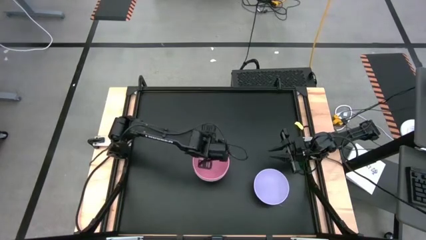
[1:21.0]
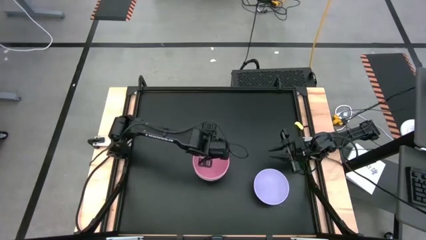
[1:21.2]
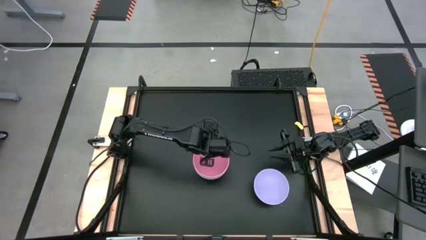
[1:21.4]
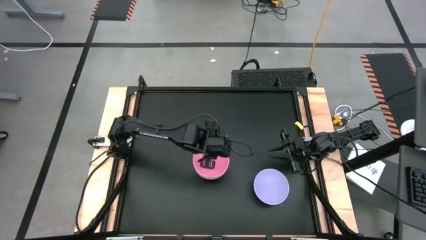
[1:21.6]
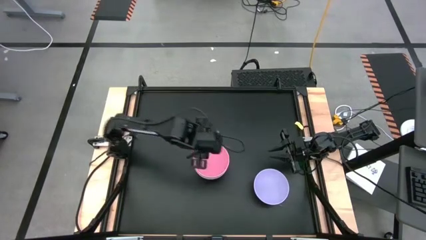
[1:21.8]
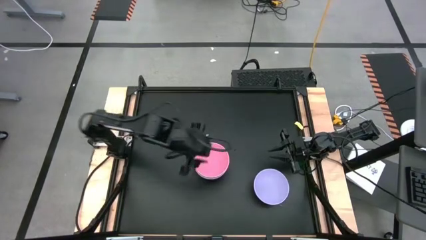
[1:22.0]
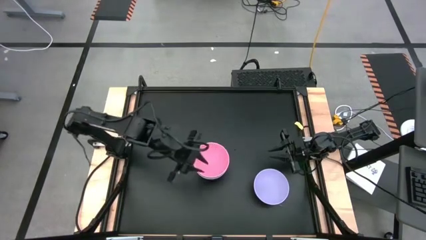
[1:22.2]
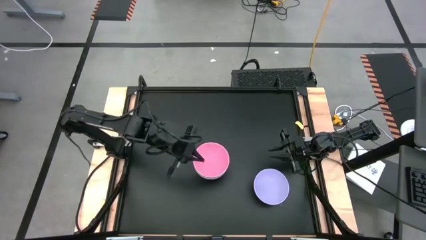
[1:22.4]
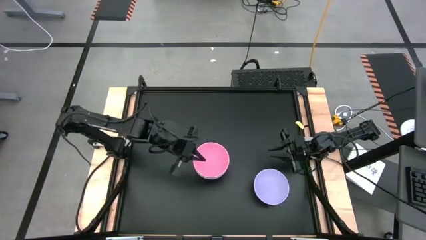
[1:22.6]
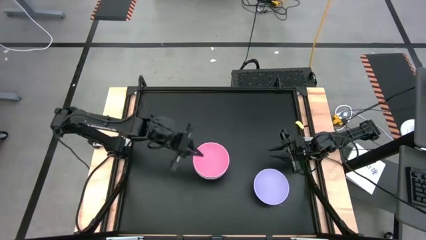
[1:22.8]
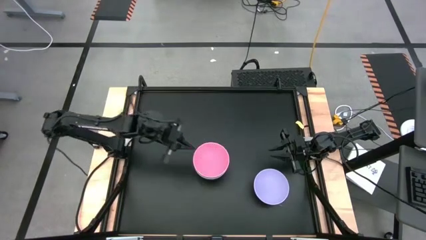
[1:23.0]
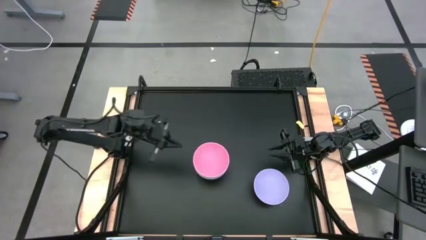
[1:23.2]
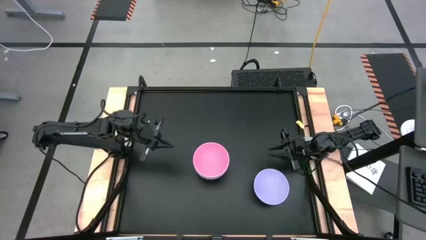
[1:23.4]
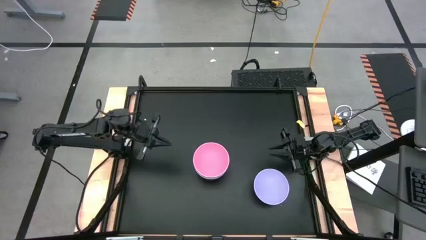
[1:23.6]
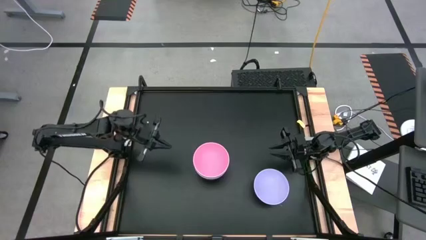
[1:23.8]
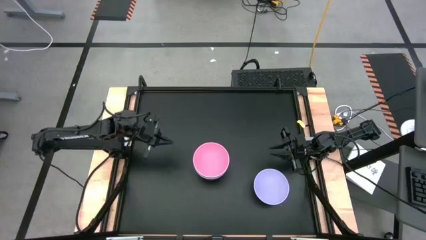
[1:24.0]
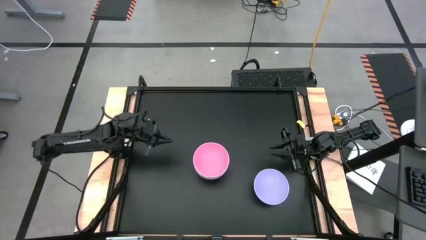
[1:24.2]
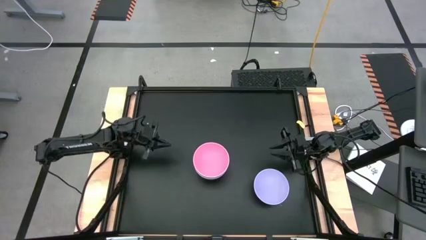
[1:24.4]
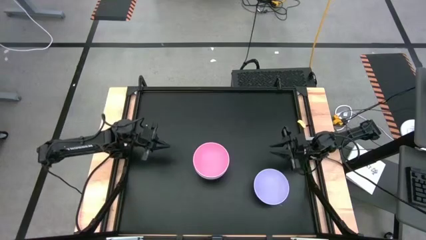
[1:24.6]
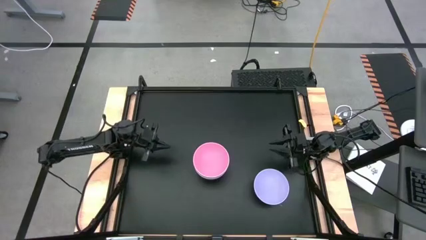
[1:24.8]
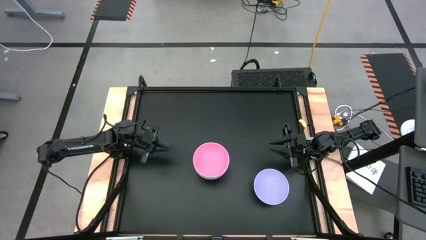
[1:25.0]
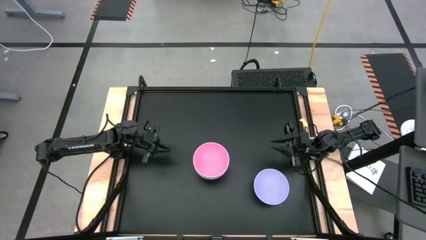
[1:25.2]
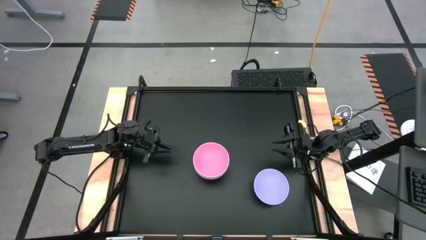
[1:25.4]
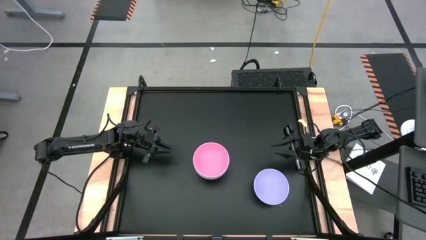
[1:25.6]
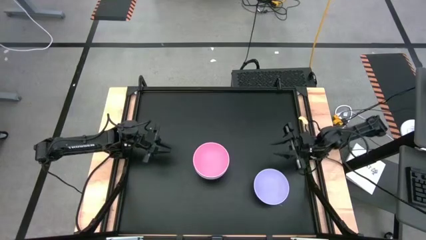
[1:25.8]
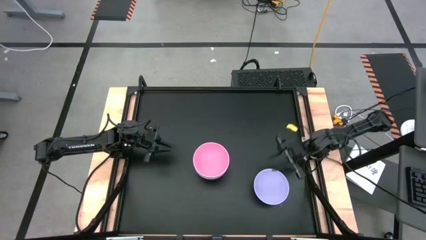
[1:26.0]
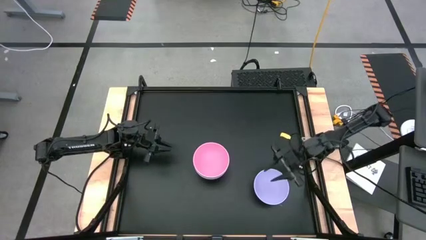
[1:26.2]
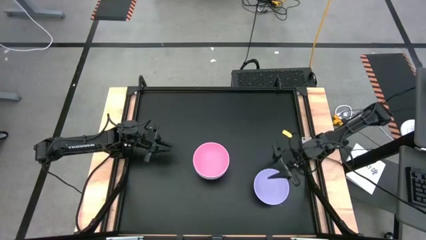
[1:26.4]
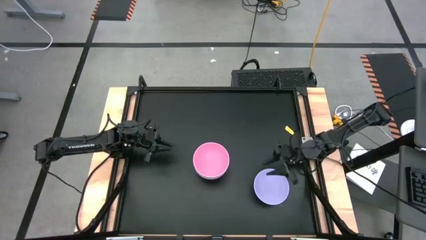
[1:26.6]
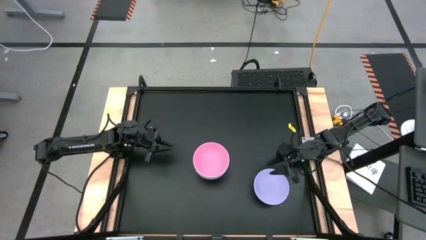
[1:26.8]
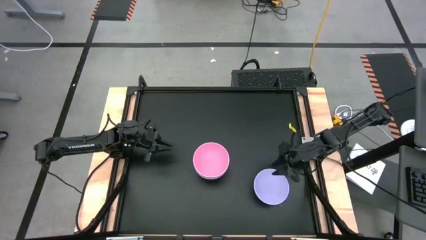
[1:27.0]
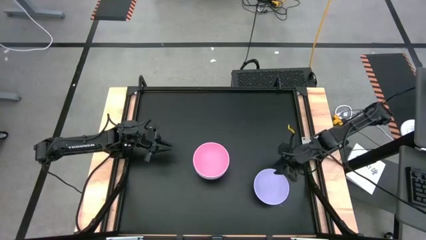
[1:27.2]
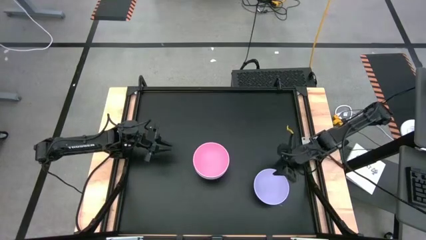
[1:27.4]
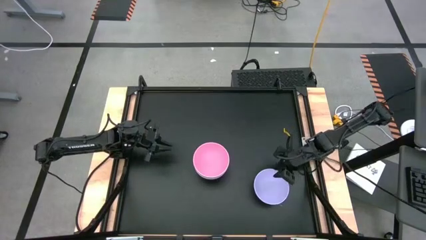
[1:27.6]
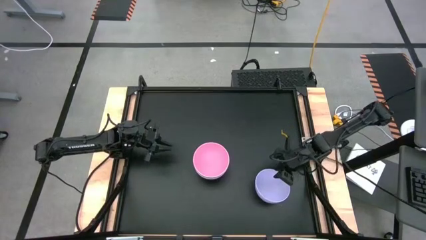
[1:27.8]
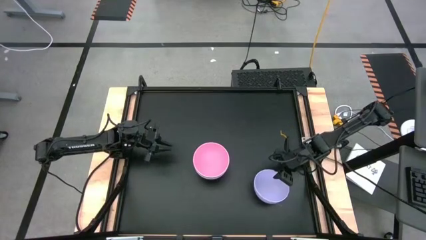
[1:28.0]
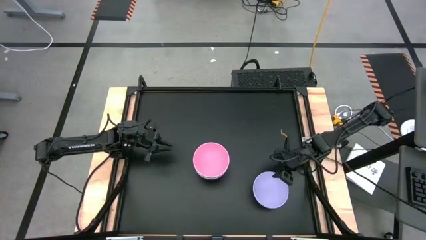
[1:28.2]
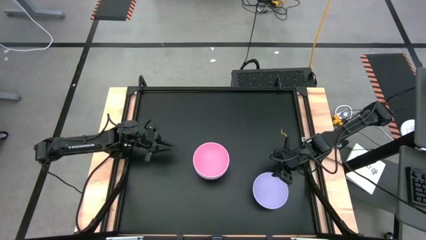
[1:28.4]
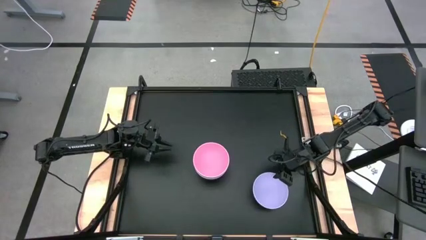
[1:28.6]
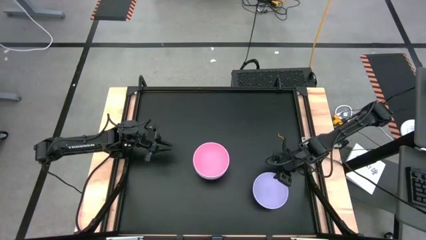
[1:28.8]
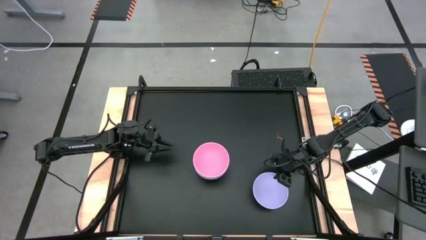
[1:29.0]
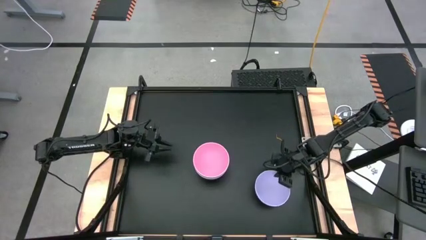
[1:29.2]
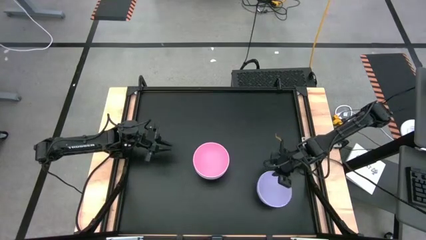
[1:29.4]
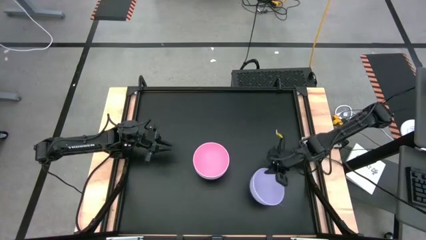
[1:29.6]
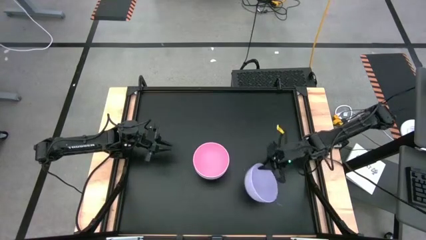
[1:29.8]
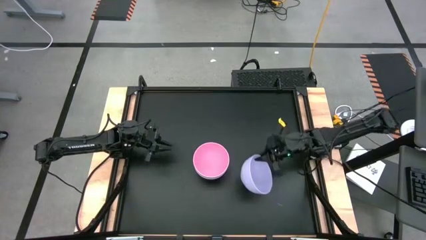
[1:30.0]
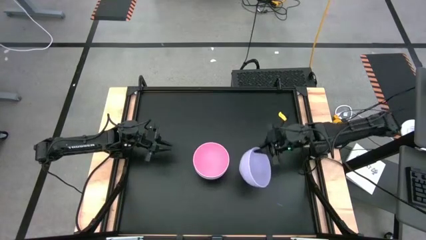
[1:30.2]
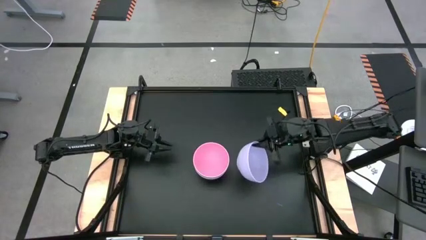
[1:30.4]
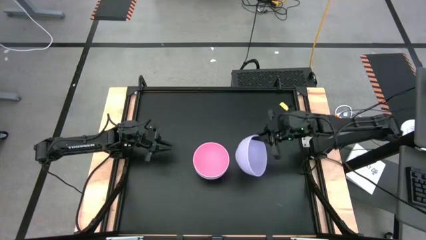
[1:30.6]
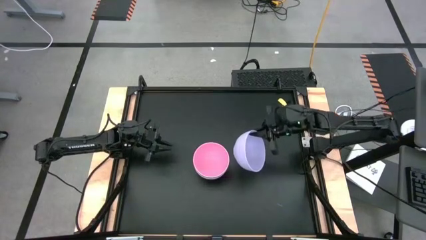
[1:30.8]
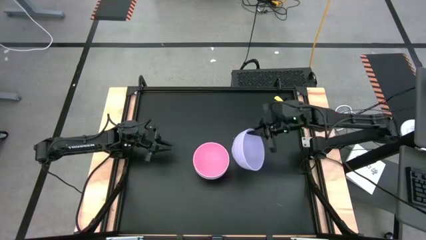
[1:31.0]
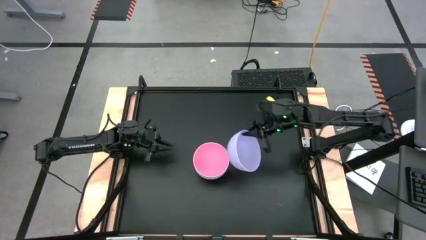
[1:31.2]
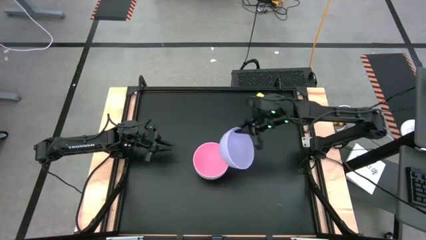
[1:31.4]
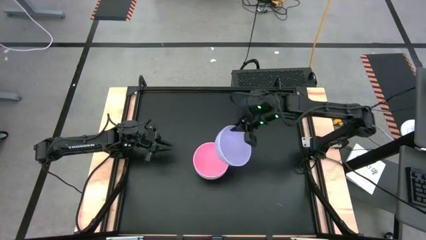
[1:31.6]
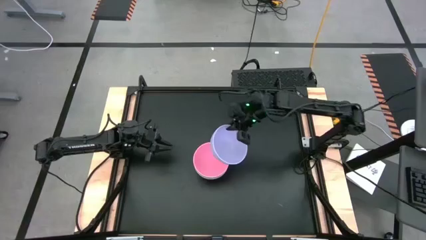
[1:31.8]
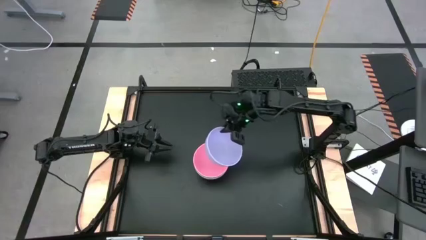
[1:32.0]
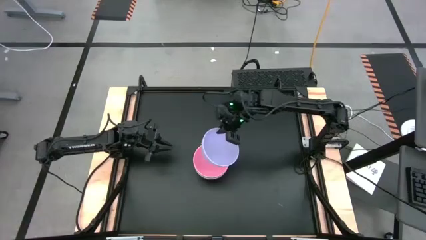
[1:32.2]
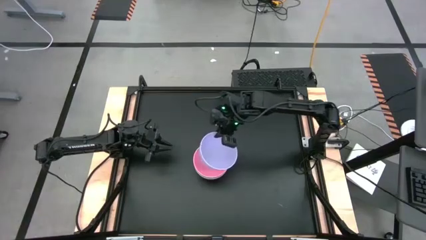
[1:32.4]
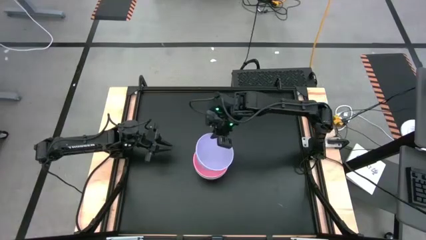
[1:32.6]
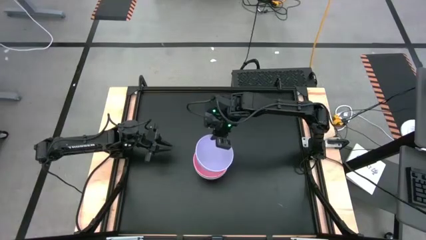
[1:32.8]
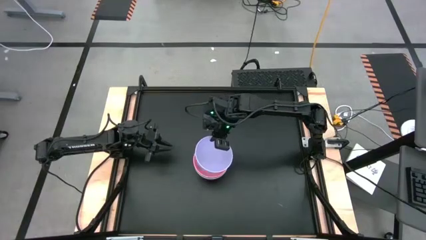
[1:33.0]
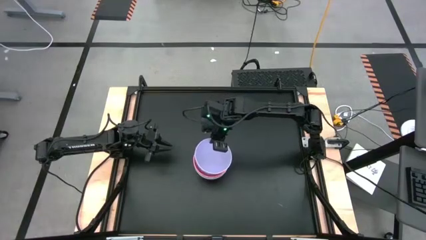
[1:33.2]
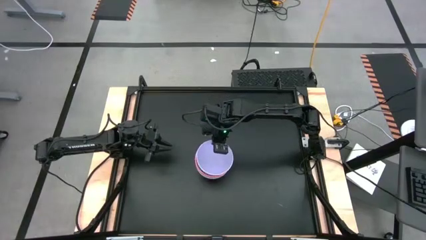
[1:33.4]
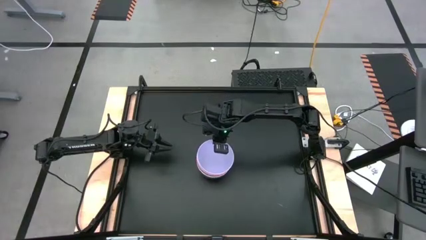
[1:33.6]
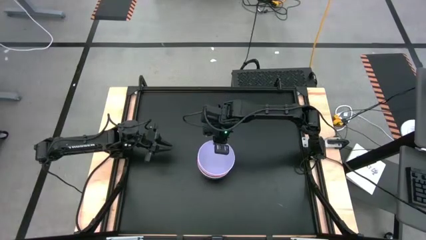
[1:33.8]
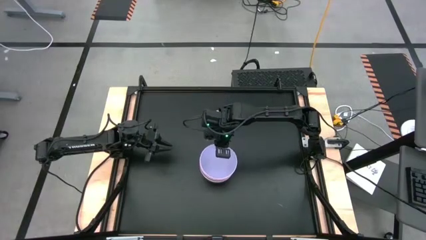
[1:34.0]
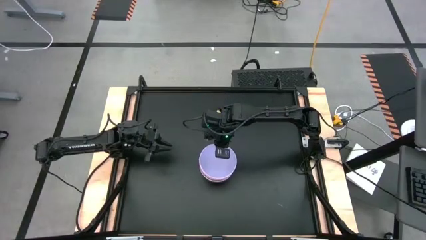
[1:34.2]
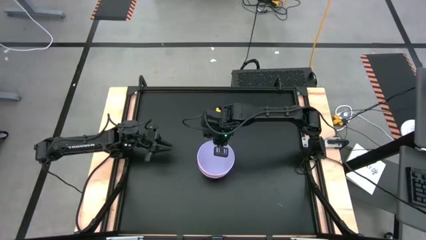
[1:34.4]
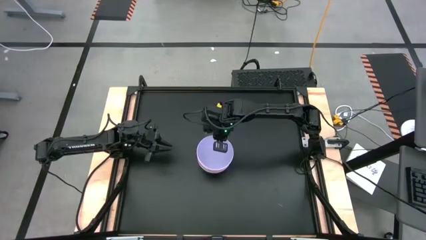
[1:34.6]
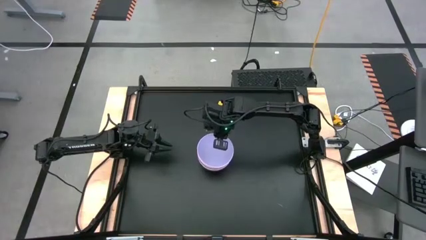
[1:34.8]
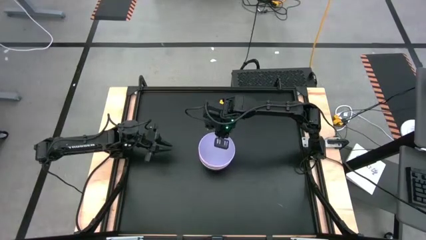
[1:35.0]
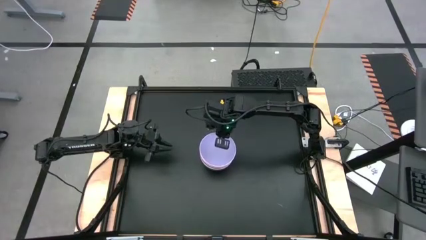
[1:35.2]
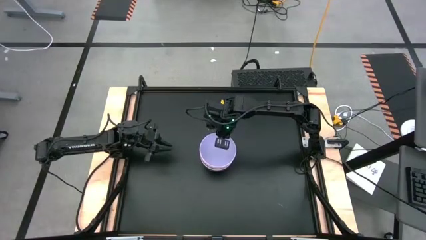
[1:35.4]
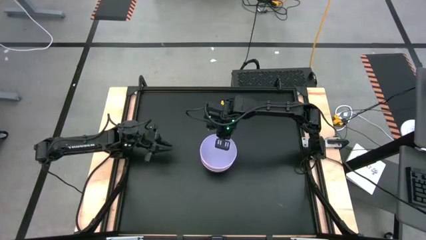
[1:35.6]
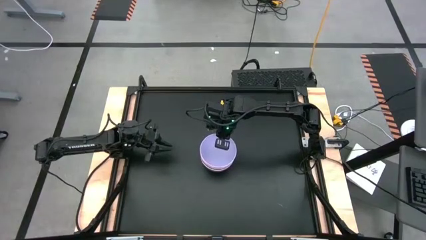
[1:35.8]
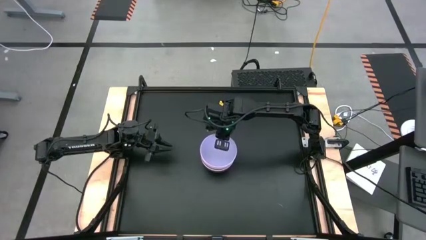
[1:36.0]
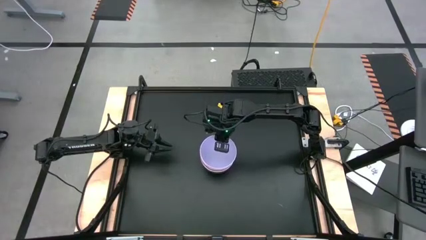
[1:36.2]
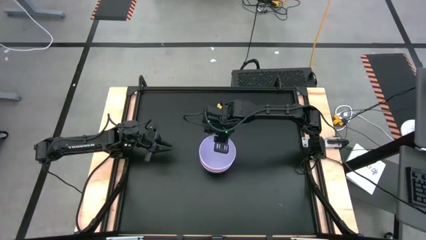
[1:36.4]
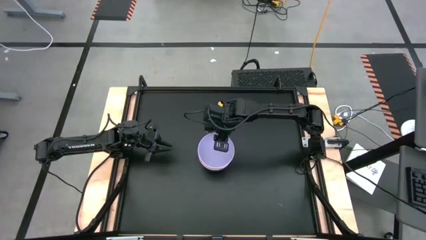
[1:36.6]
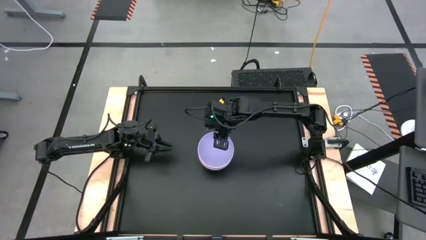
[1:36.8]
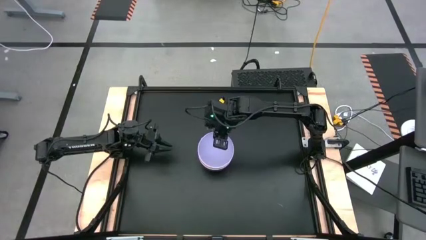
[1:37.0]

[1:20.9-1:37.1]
Task: Nest bowls inside each other
Stack the light purple bowl on top of the stacked pink bowl
